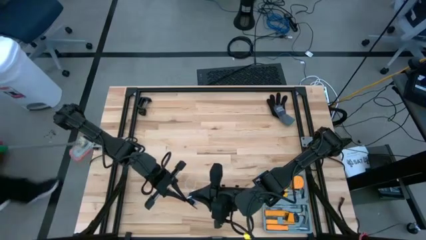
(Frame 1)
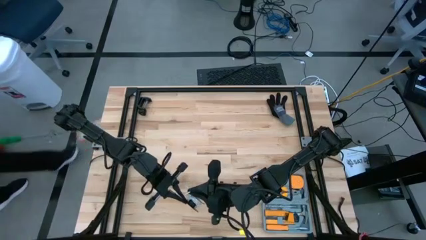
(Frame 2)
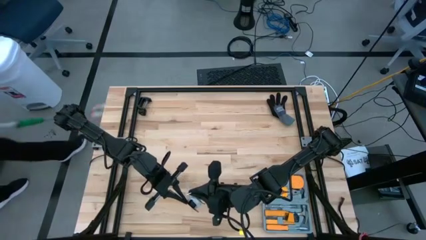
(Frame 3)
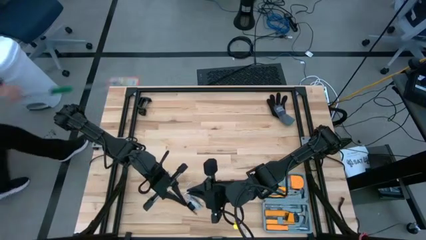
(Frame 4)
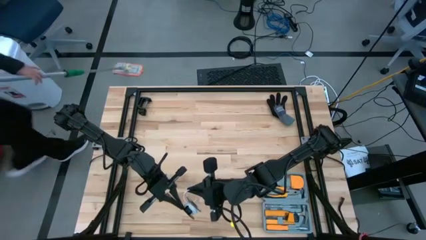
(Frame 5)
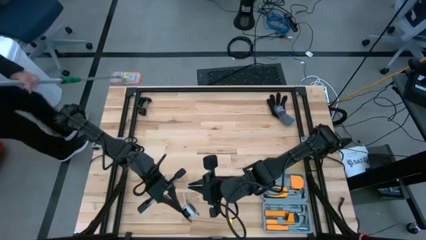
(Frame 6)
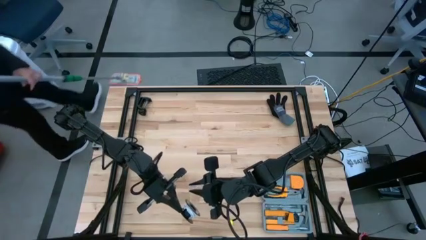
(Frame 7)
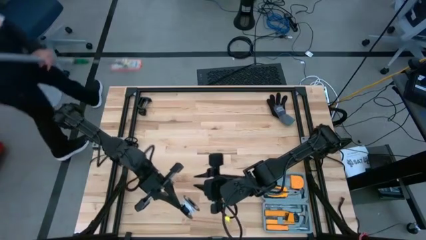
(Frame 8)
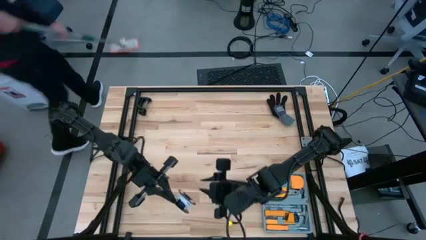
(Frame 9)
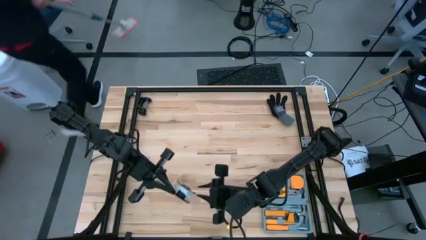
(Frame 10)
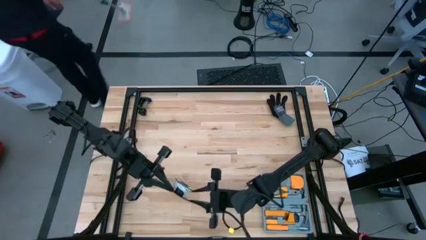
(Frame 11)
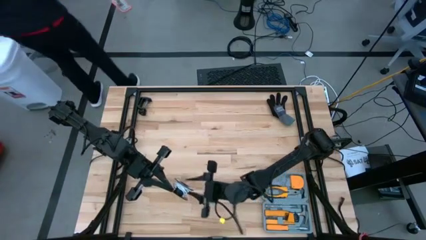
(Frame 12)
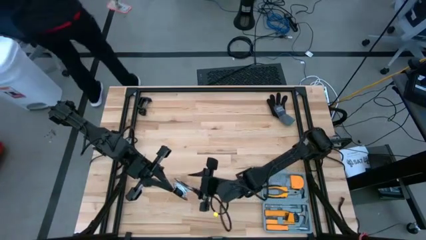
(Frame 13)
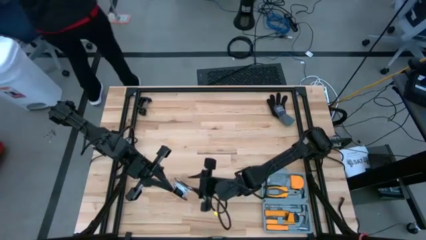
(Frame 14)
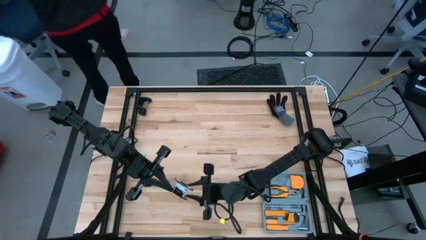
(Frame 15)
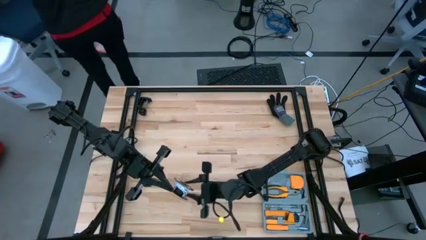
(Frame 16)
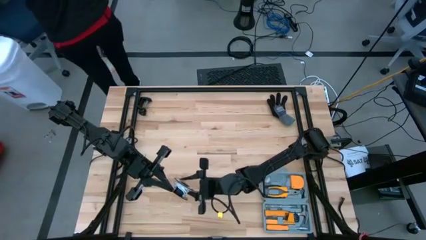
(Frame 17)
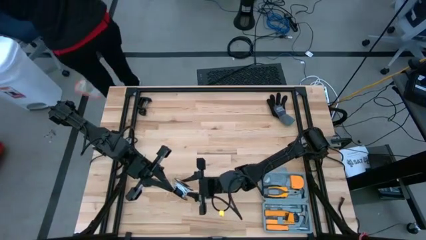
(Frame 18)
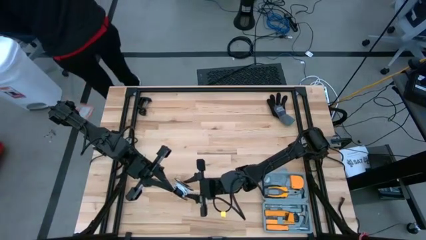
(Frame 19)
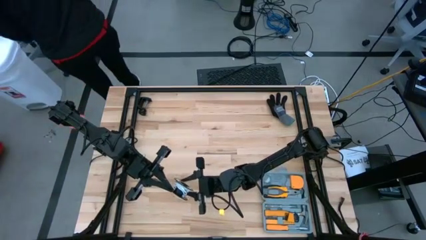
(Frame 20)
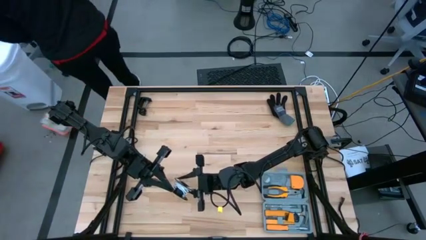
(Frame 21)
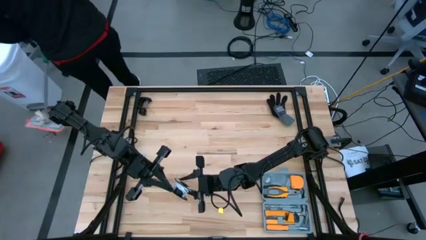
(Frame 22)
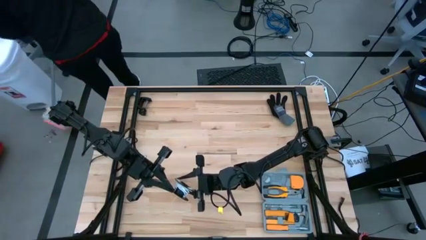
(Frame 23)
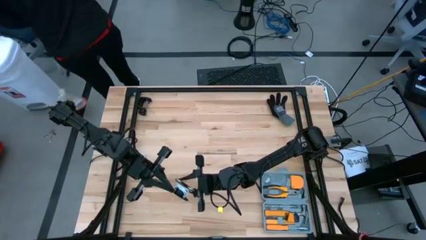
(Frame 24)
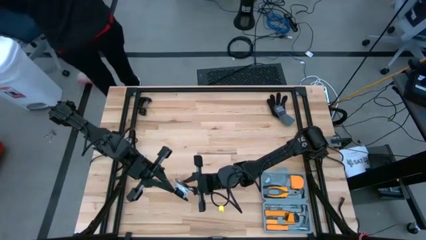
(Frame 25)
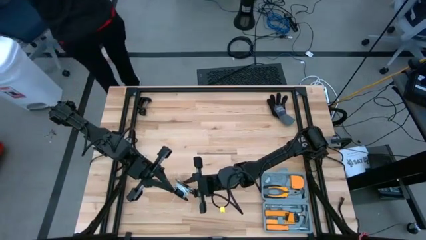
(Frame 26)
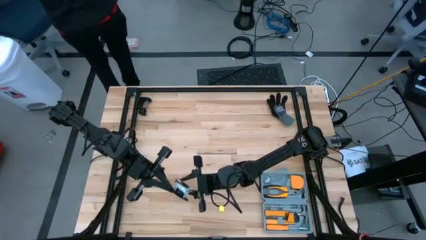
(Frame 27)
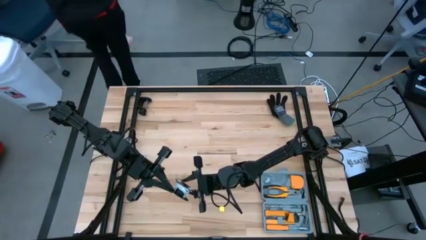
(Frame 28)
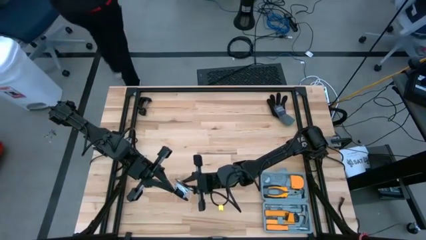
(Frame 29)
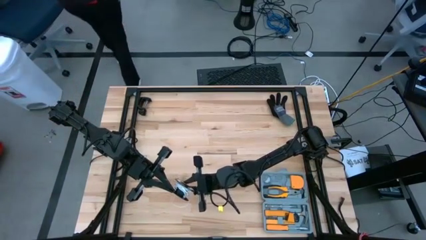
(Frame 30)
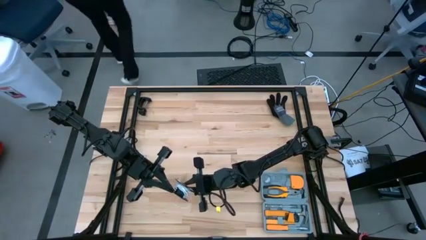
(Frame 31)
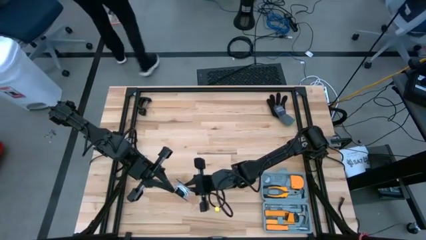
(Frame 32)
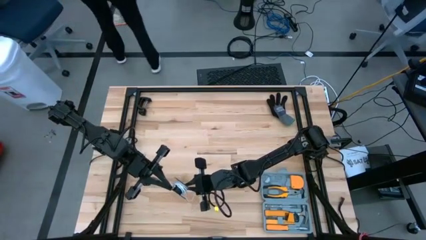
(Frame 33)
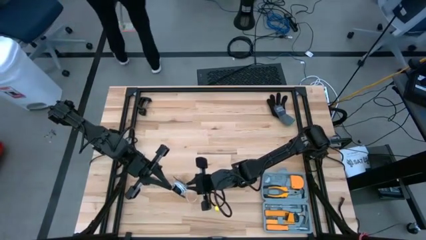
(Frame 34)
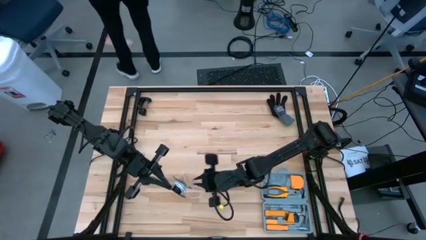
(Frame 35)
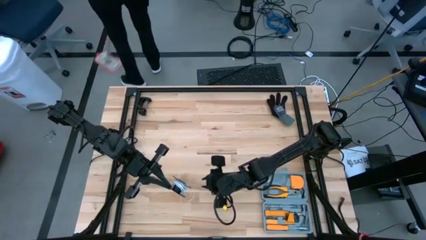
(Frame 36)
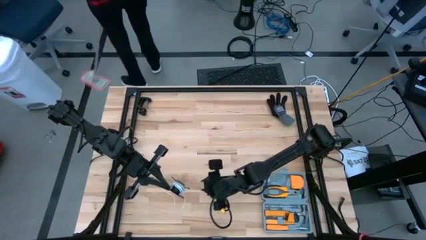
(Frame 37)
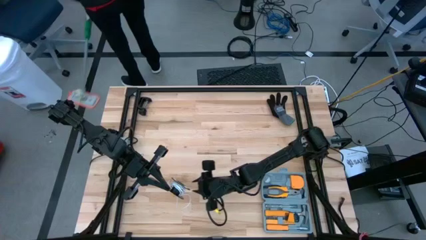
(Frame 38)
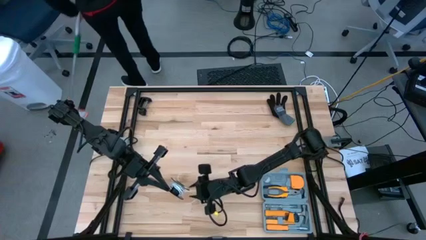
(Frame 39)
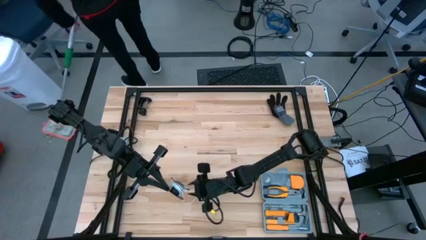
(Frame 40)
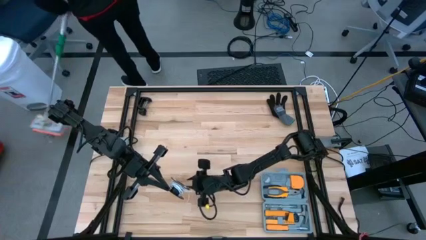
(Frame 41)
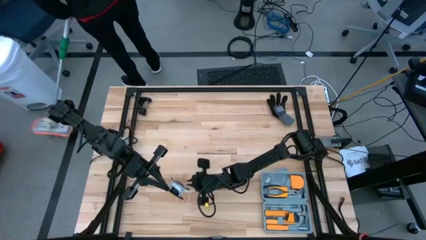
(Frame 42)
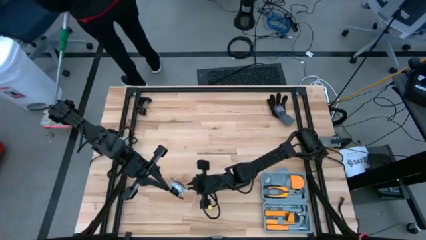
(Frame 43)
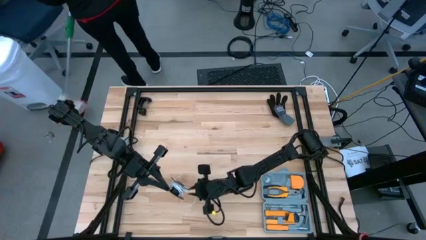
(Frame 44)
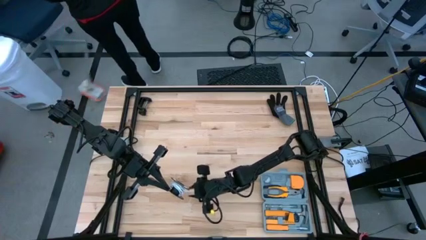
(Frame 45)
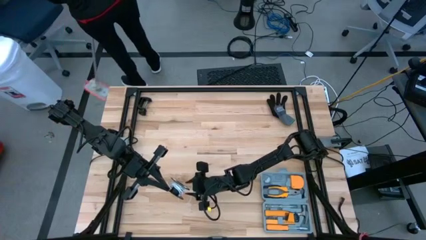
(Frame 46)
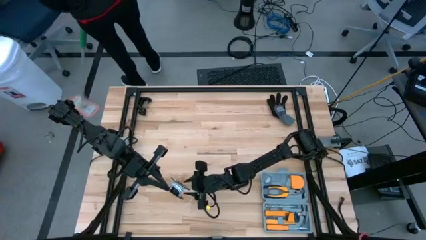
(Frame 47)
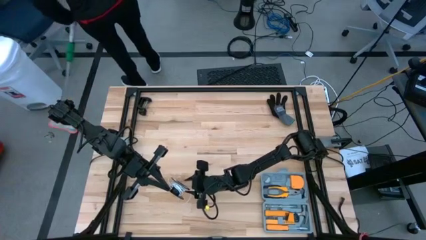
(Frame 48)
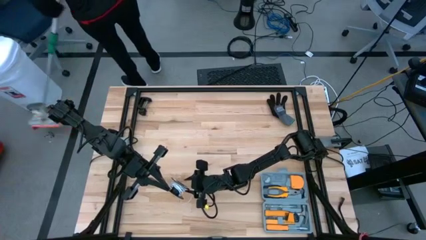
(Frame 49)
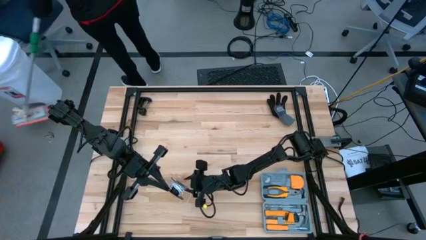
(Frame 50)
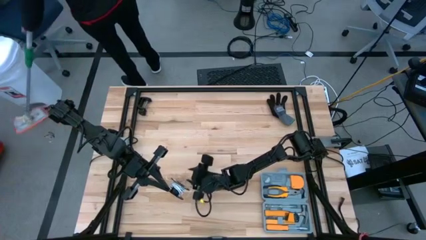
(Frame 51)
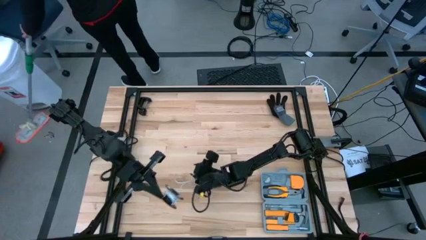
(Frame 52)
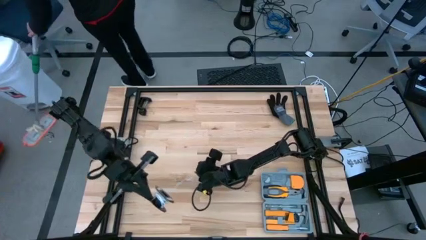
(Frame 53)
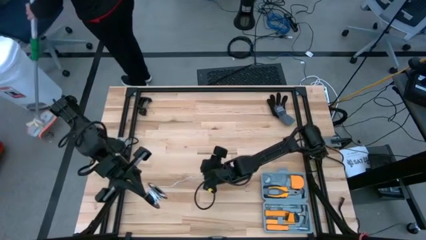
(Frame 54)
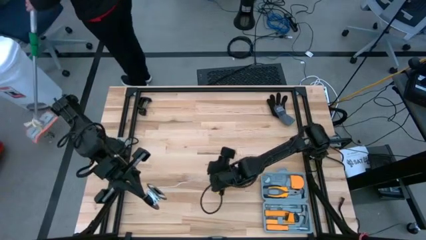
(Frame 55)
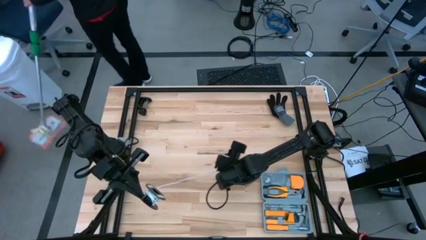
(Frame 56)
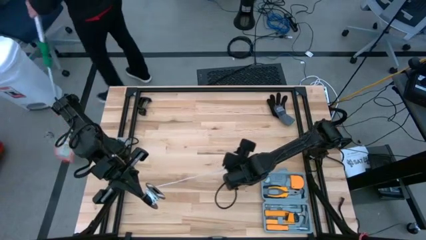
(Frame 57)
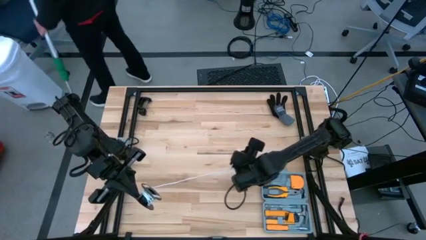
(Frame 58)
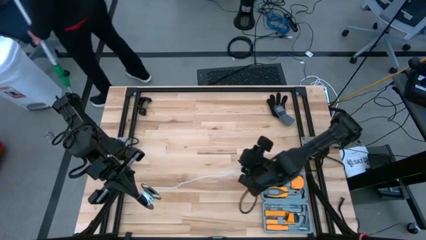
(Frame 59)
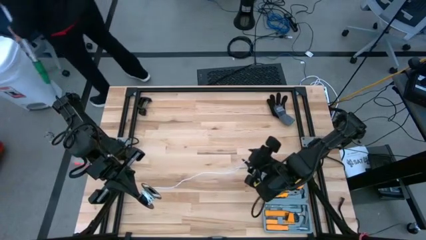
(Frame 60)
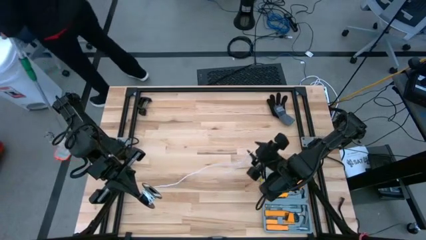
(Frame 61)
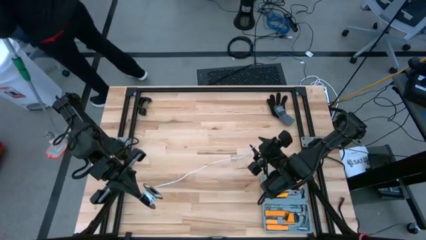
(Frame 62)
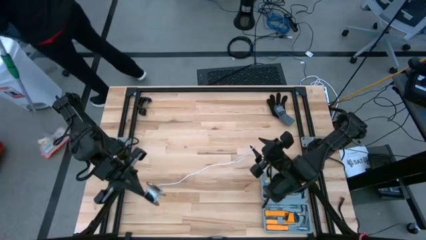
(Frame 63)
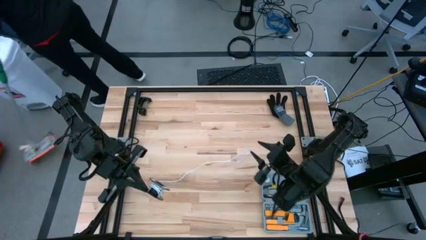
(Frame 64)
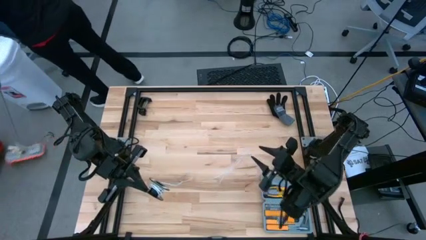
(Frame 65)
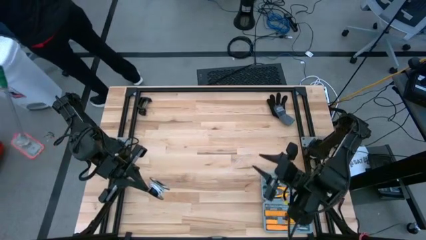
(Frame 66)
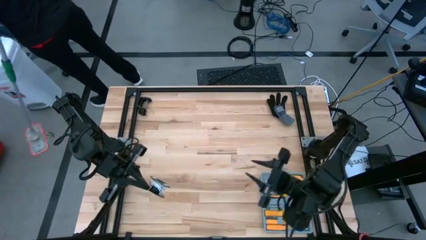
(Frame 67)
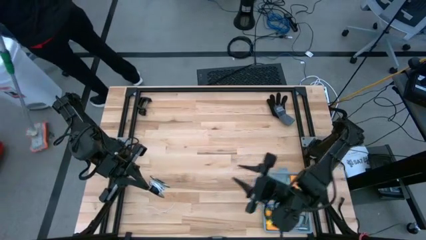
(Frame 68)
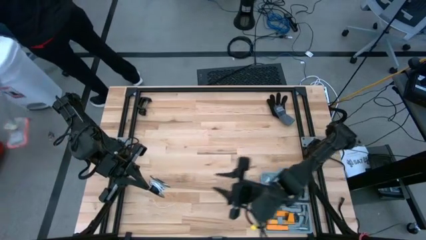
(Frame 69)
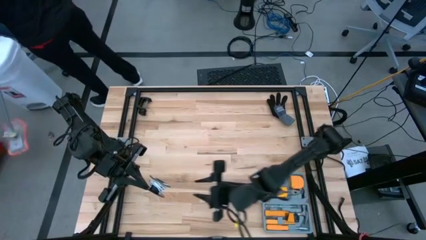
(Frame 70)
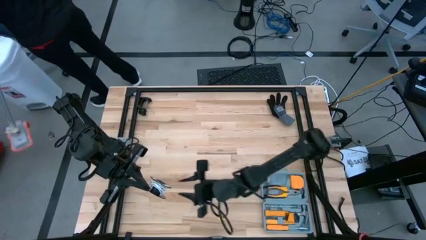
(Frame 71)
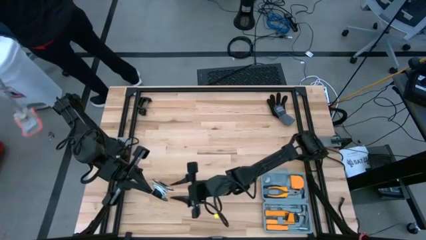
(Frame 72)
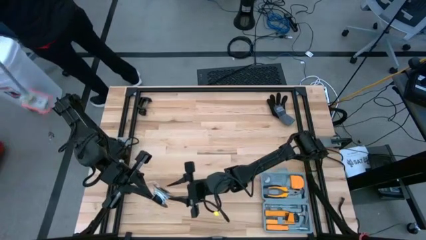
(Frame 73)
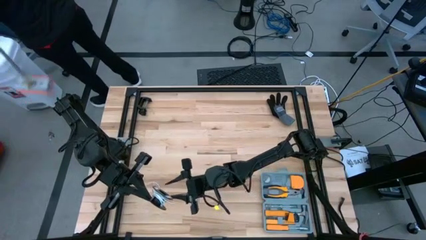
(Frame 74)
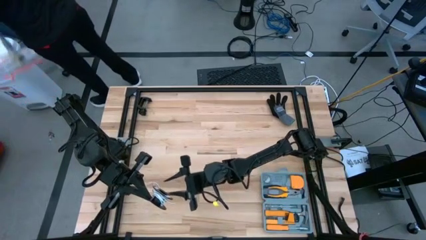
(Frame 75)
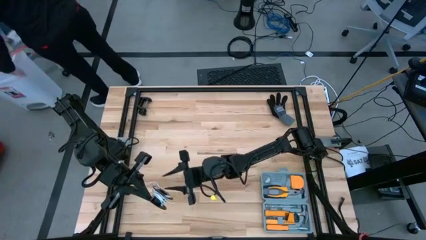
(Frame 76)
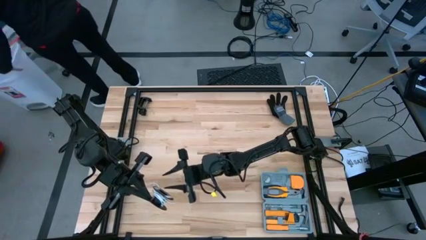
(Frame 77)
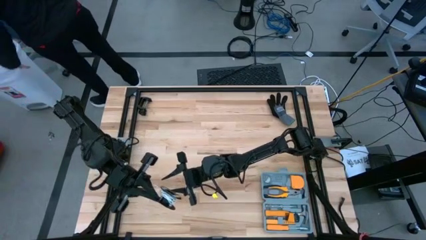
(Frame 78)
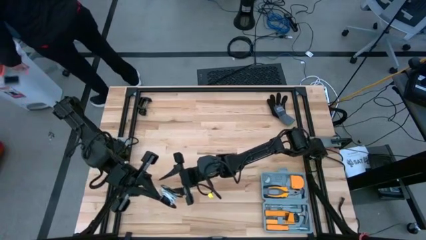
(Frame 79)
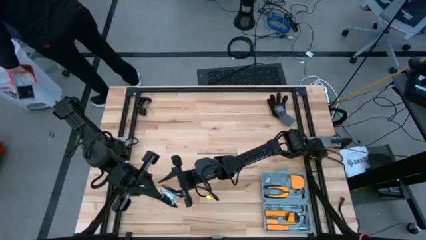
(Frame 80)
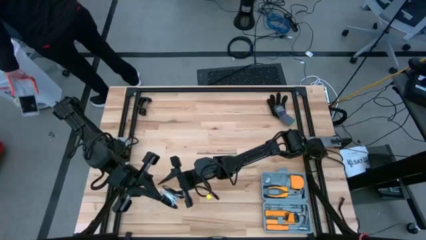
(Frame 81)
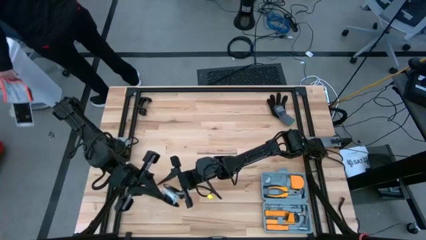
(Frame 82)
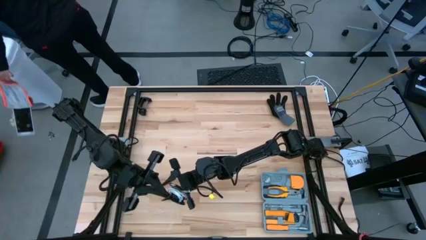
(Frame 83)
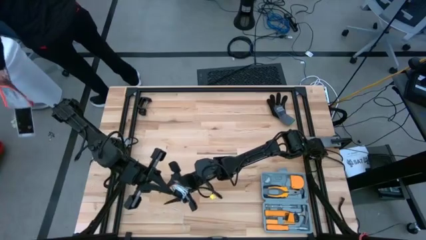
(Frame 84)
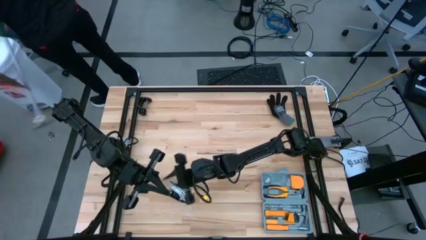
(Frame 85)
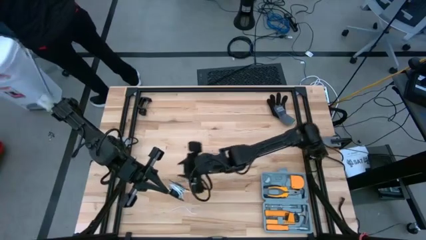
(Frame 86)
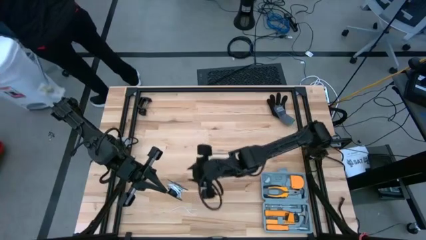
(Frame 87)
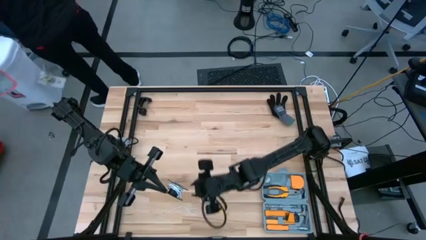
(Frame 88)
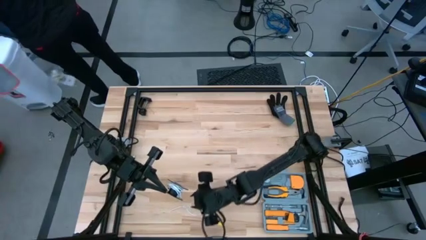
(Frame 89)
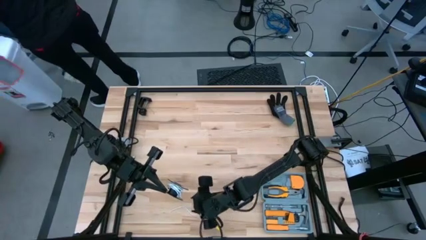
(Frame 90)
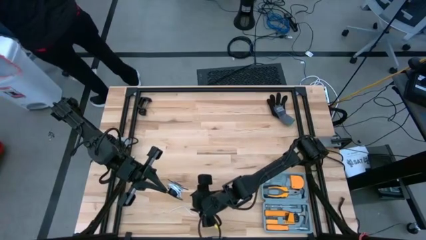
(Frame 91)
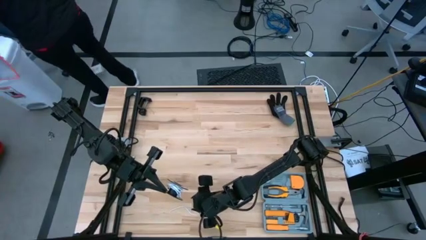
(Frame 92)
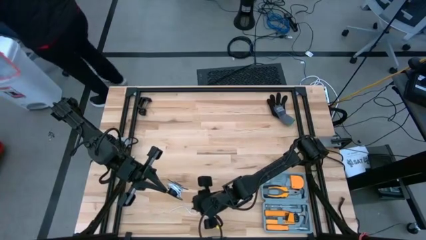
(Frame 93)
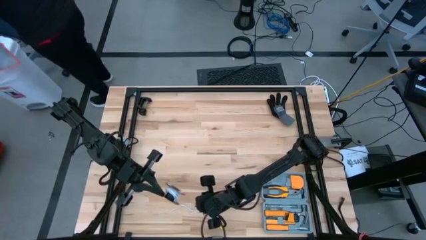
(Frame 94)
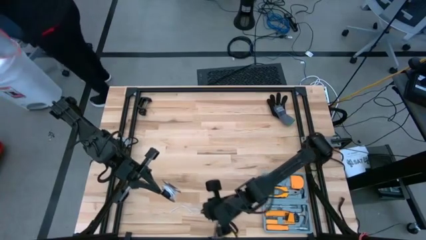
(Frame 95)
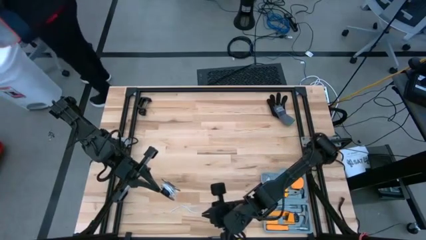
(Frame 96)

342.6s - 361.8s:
Task: Coil cords
Coil the white cable wire onto the spool
